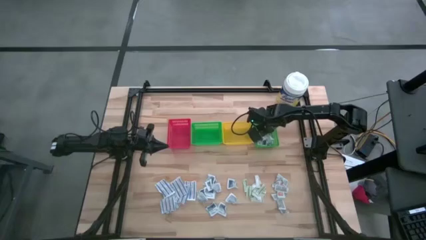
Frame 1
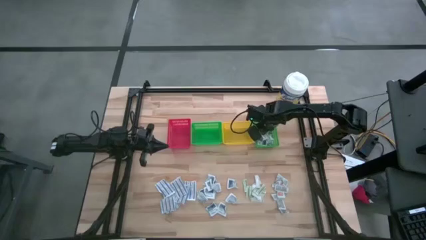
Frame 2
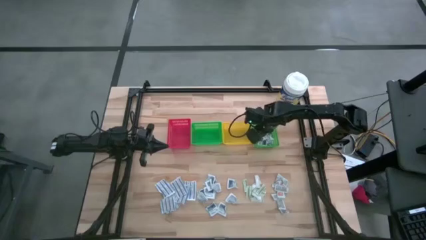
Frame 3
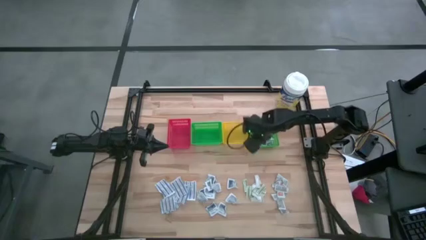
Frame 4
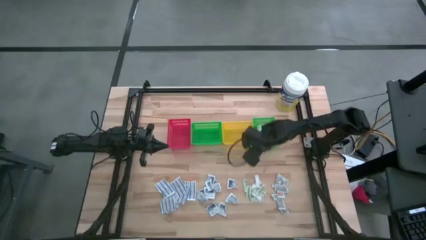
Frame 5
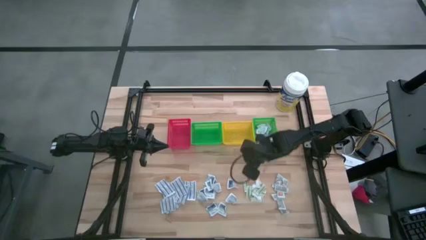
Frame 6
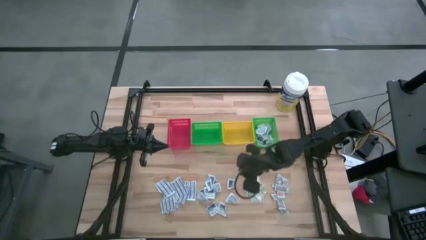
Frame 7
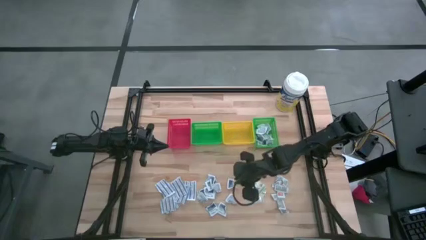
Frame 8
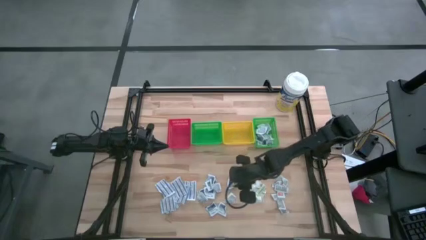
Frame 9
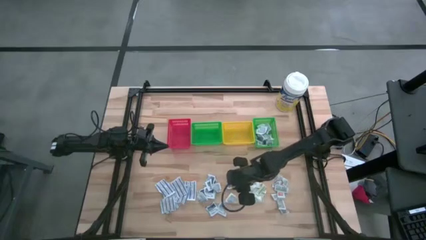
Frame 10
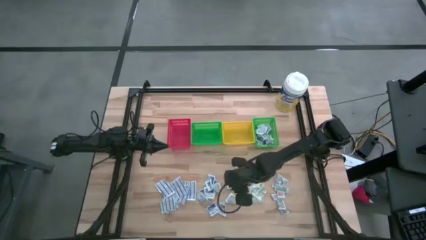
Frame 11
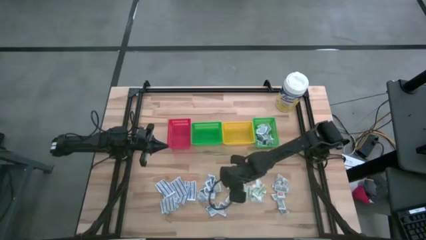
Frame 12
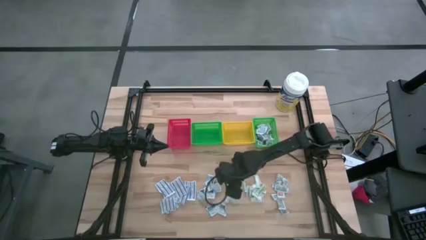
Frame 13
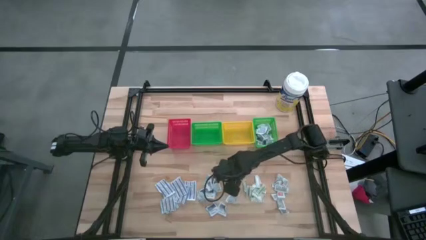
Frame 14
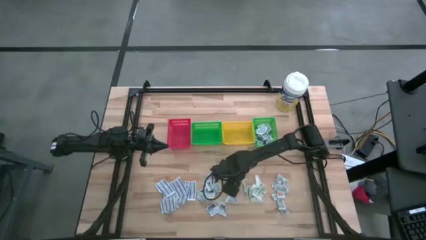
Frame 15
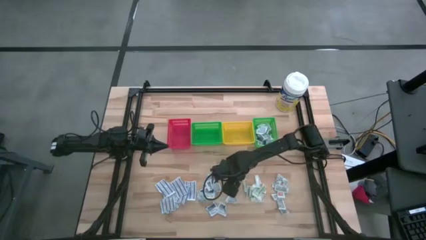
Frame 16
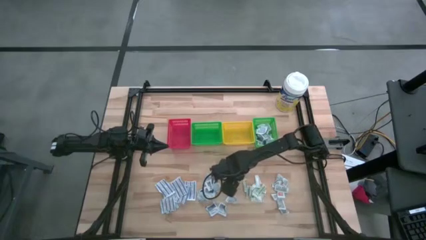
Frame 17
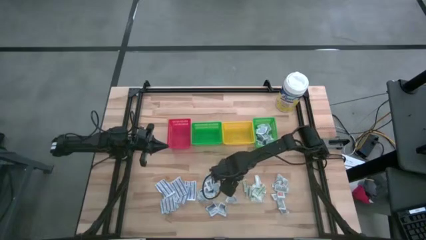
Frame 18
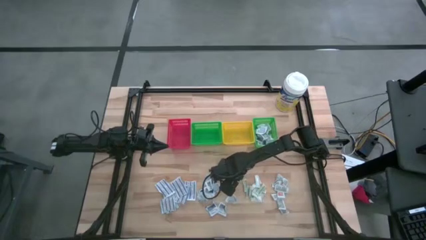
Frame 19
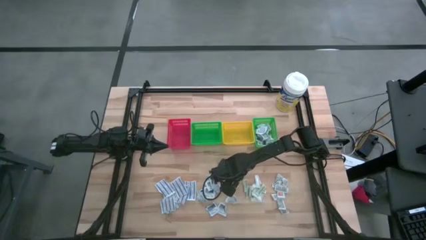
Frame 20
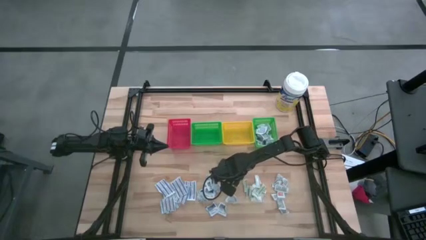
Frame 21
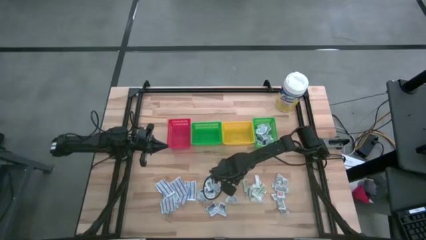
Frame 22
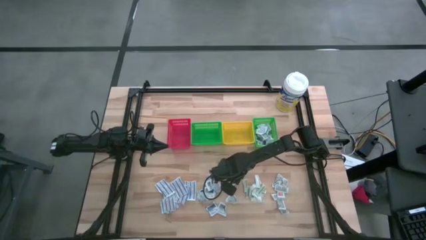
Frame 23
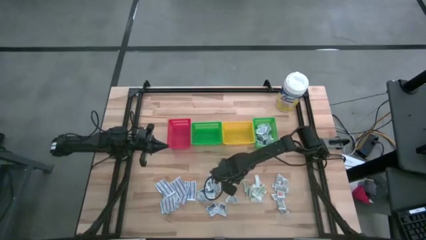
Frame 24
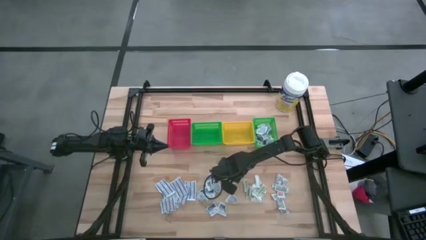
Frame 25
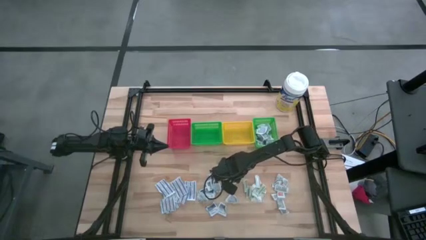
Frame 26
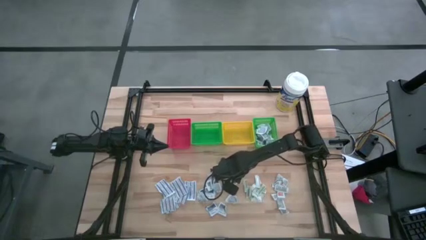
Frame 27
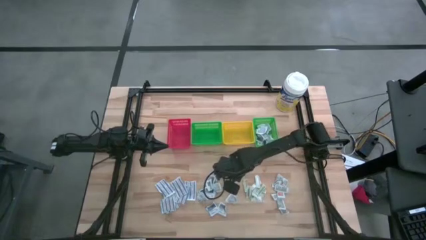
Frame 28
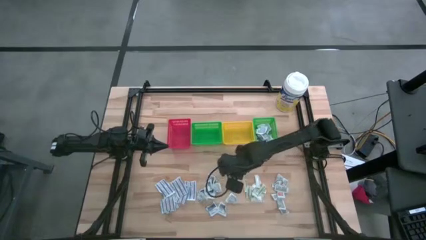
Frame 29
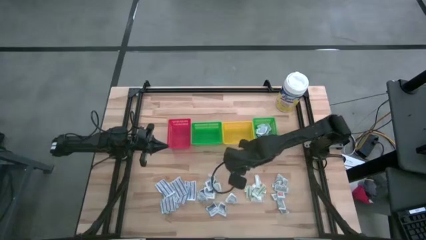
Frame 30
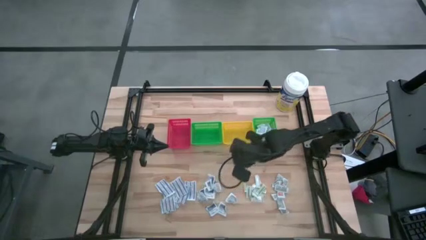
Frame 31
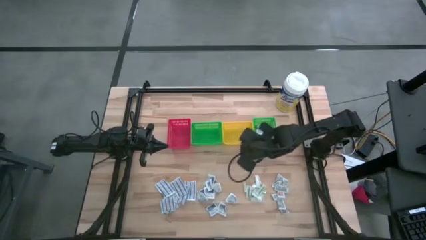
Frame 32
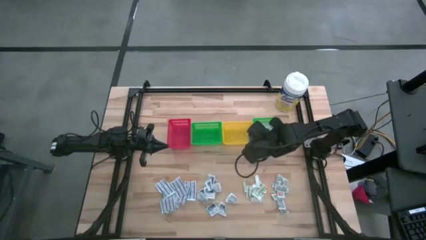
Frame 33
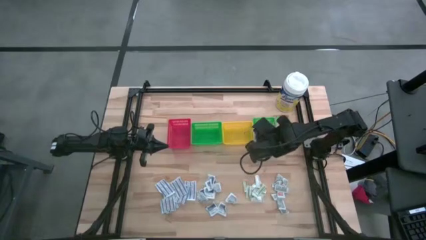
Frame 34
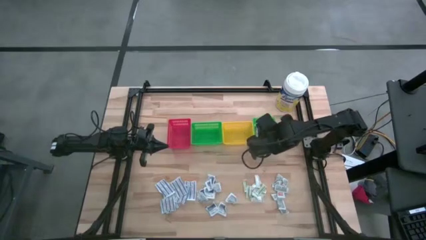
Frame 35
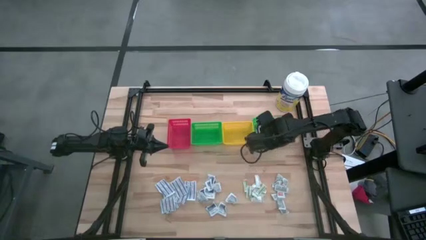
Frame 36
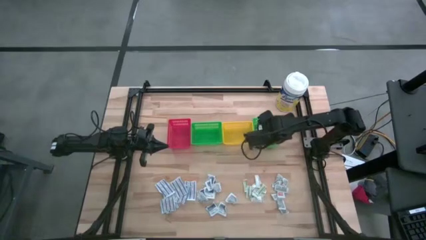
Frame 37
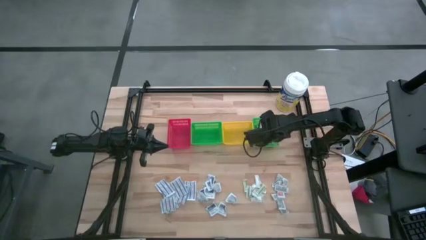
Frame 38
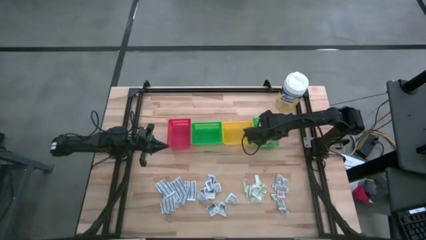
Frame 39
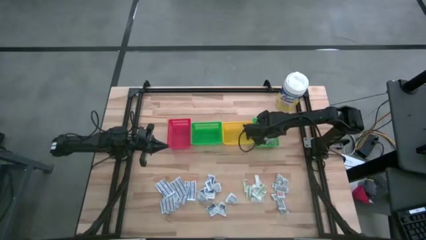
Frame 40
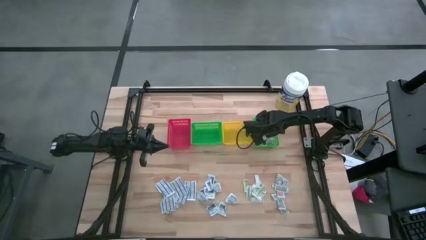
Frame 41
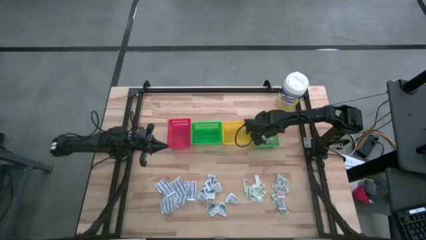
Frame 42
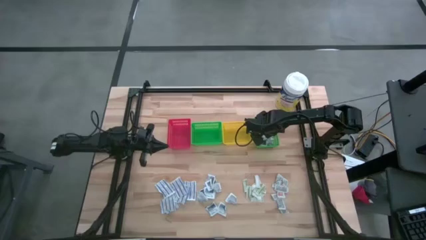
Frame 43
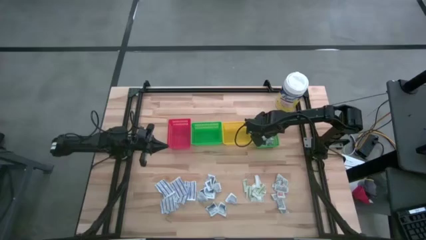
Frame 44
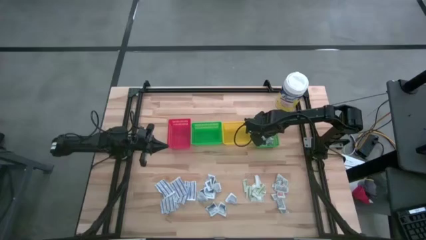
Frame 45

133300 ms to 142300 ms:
Task: Pick & Place First Aid Supplies
Put the blue alcohol pad into the right green bin

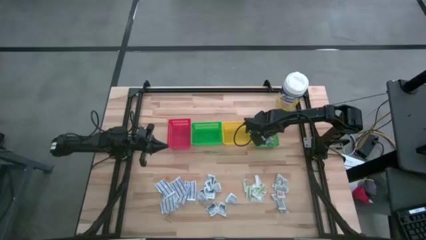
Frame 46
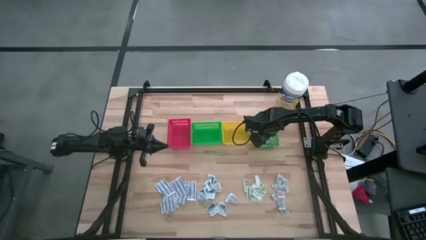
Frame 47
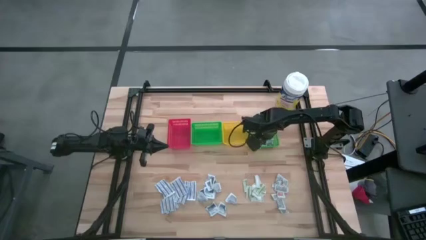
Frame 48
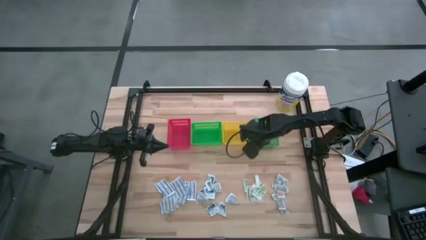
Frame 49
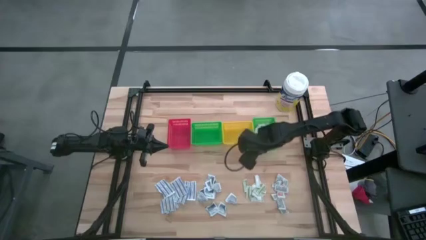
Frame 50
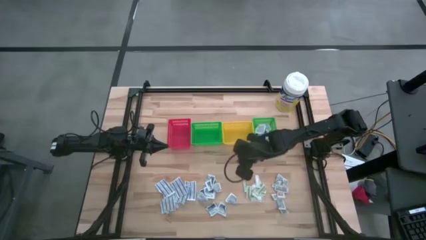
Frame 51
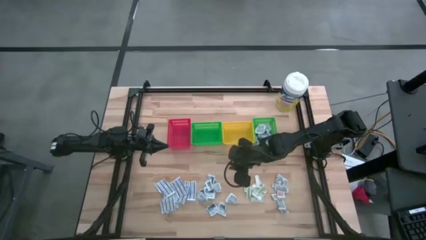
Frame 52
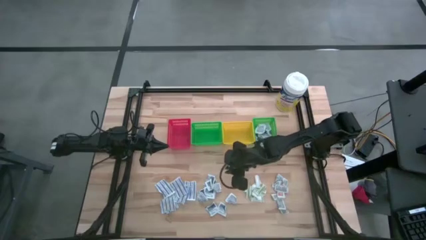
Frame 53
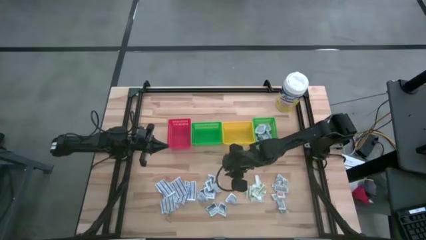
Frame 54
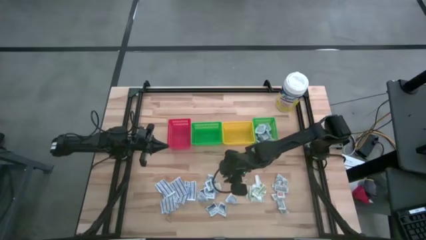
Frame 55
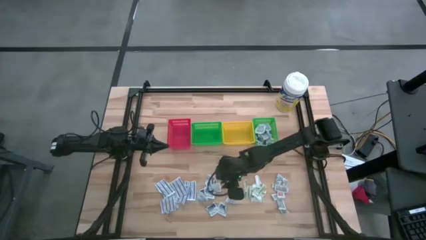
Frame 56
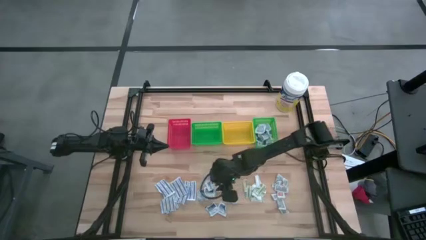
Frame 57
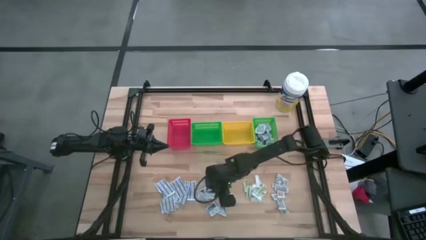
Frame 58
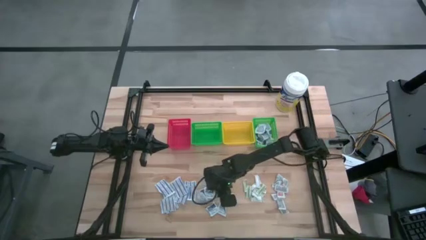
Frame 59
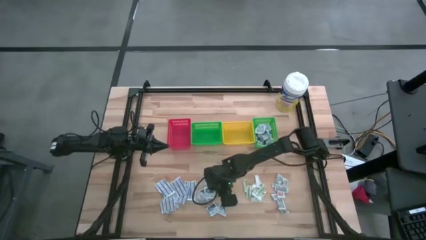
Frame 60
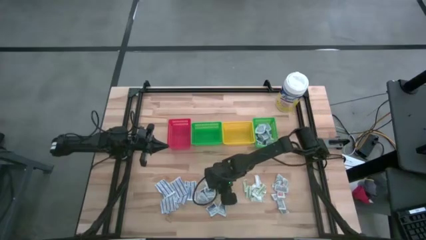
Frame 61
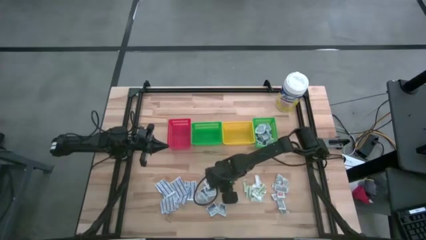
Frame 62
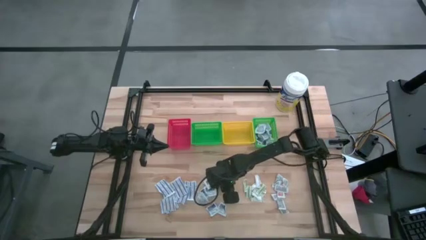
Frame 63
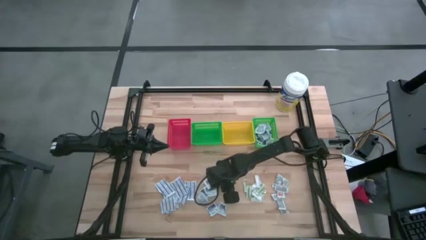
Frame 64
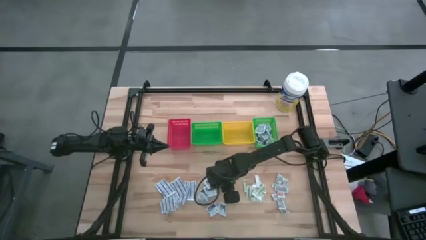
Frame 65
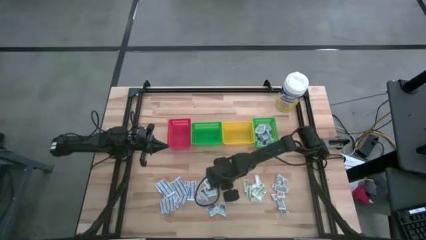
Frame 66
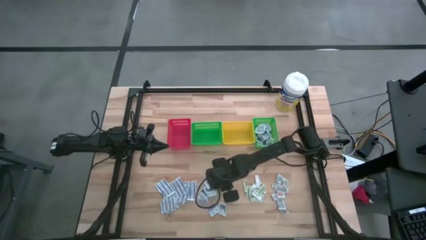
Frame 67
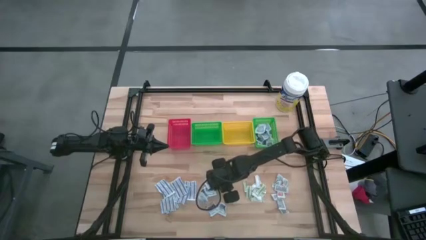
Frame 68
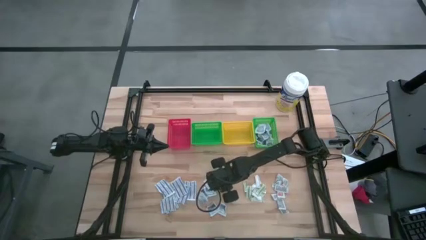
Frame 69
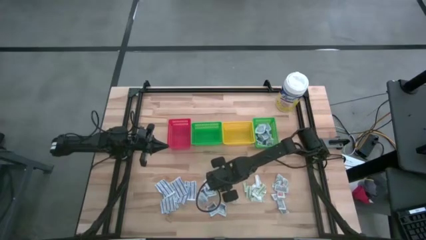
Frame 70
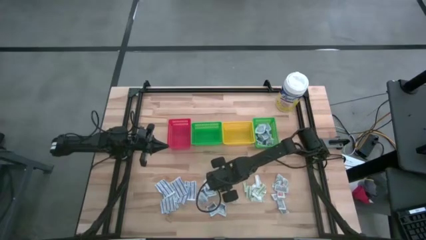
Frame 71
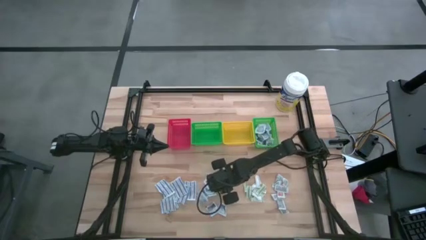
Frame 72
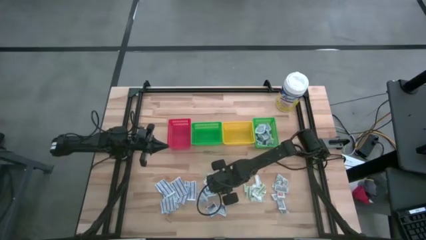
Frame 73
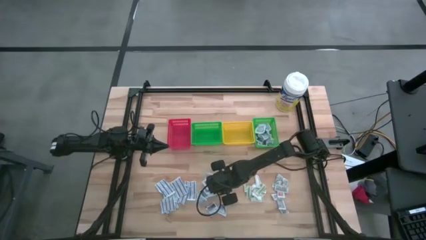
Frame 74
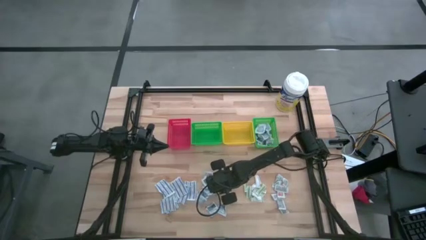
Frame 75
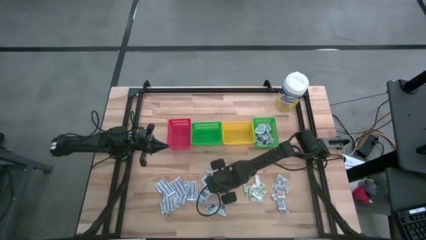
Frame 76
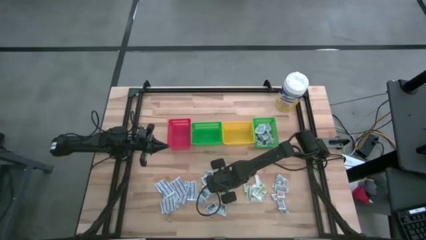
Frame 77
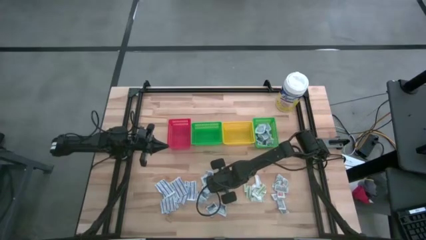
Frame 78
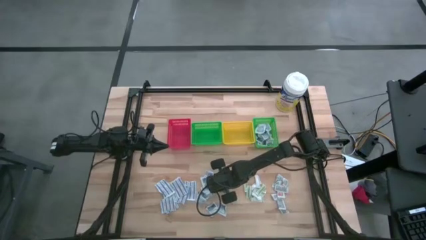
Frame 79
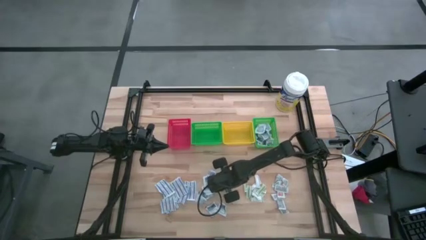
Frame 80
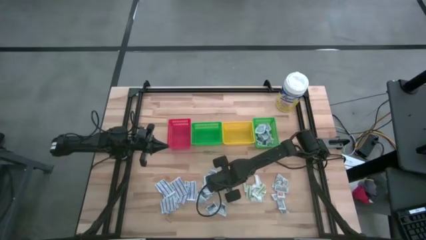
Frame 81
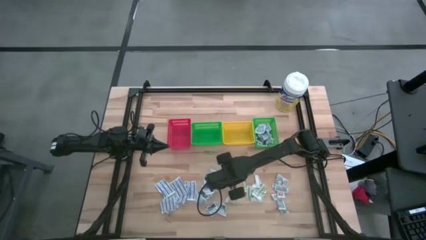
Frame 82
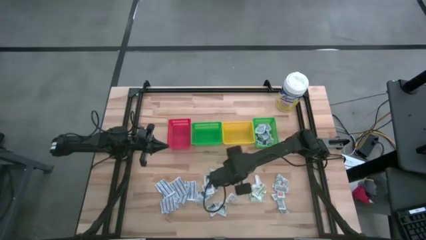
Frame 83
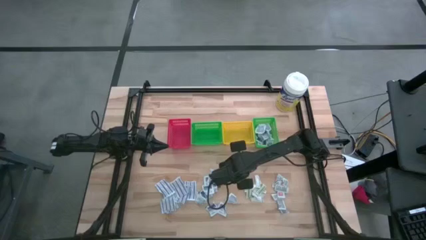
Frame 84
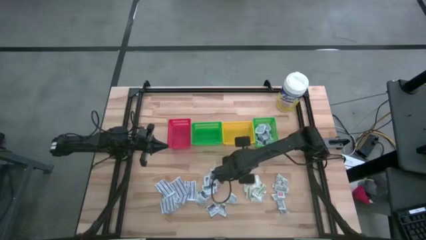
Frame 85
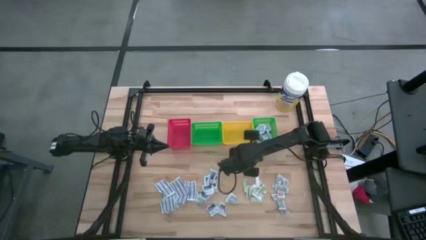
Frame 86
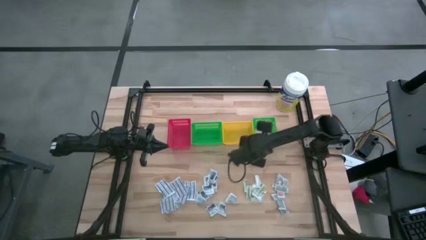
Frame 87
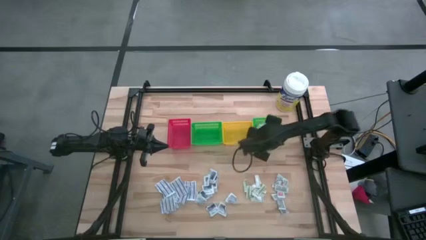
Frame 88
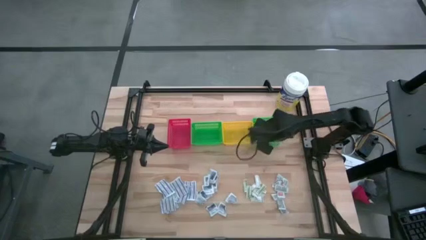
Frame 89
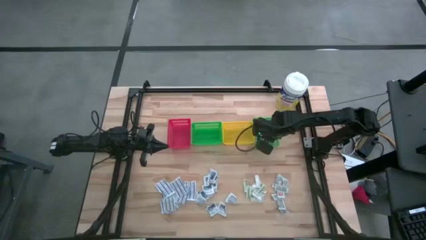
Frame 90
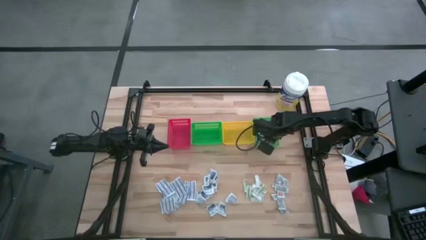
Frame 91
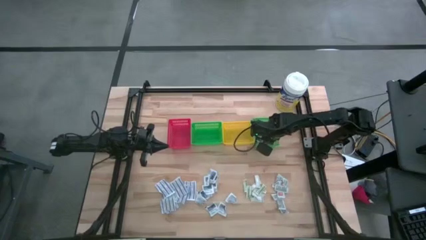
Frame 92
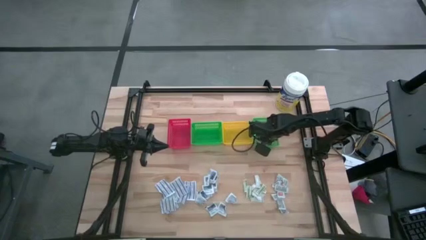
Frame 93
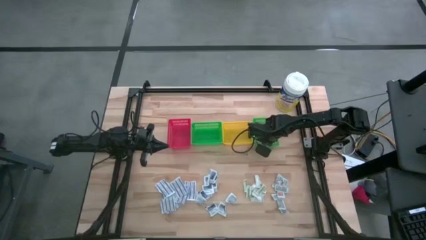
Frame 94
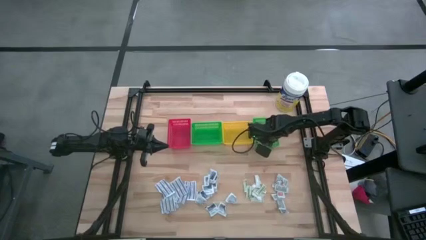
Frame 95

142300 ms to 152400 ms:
Put the blue alcohol pad into the right green bin
